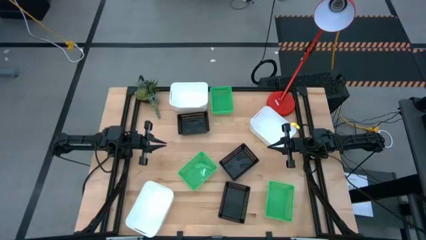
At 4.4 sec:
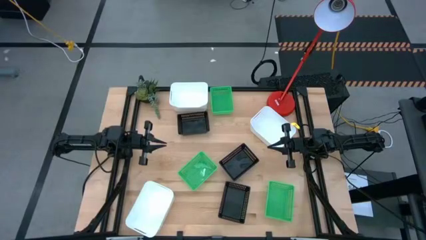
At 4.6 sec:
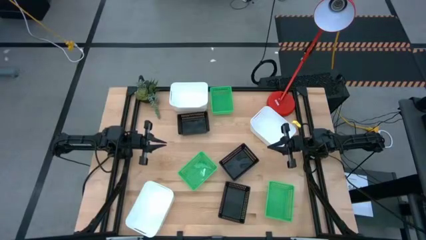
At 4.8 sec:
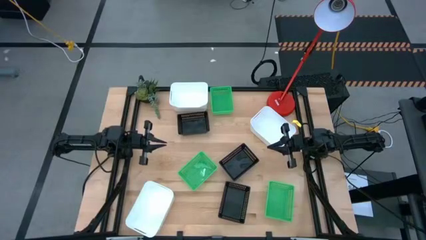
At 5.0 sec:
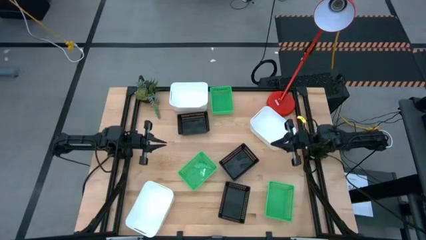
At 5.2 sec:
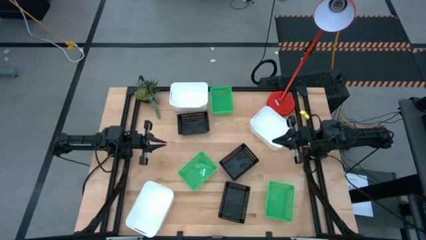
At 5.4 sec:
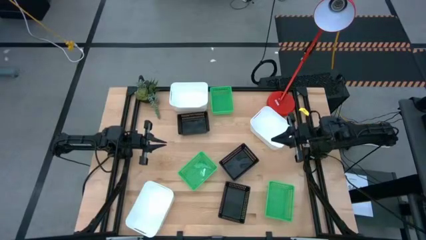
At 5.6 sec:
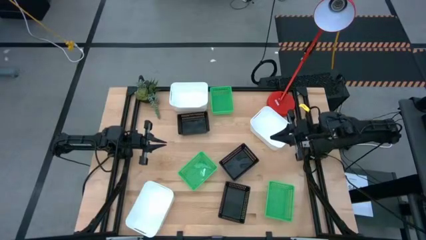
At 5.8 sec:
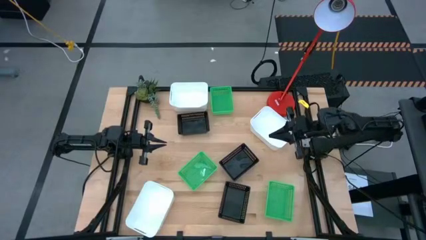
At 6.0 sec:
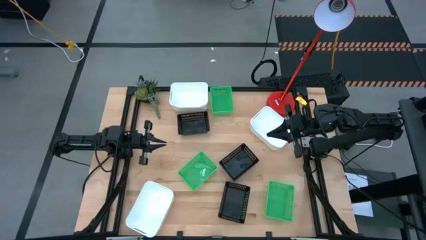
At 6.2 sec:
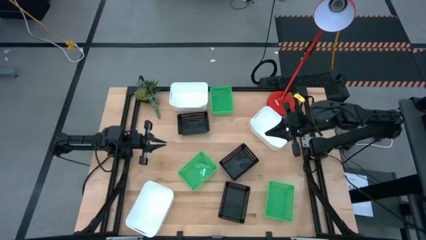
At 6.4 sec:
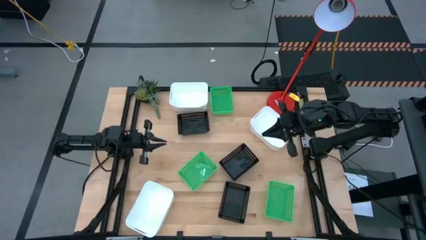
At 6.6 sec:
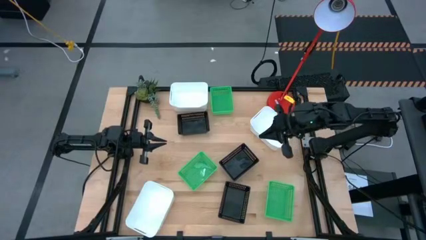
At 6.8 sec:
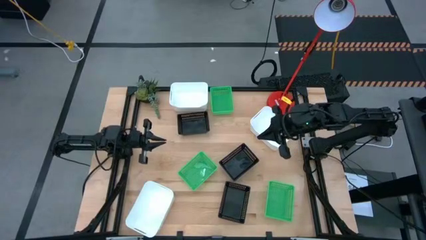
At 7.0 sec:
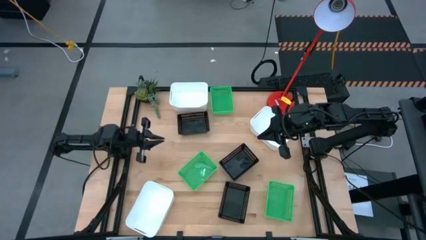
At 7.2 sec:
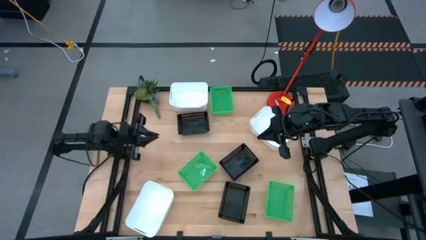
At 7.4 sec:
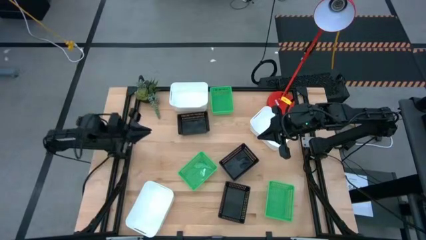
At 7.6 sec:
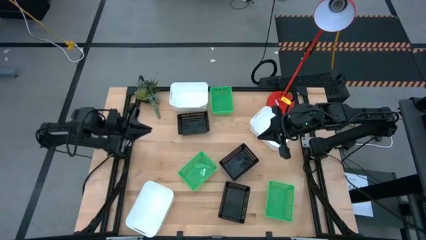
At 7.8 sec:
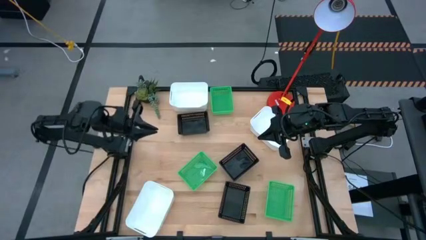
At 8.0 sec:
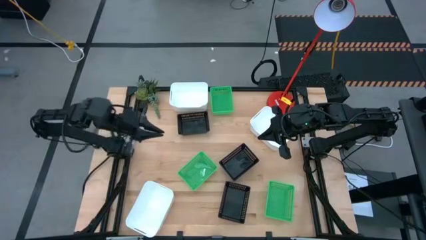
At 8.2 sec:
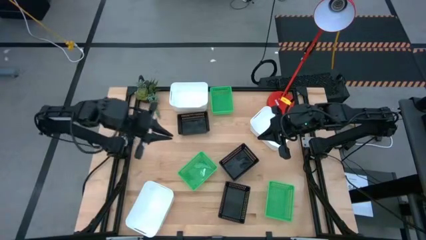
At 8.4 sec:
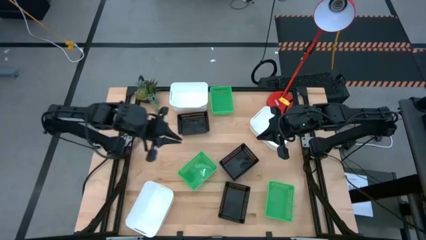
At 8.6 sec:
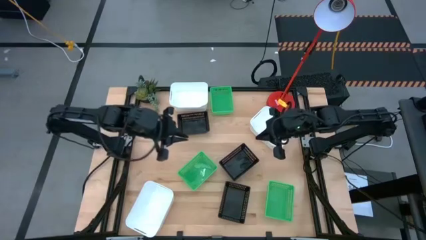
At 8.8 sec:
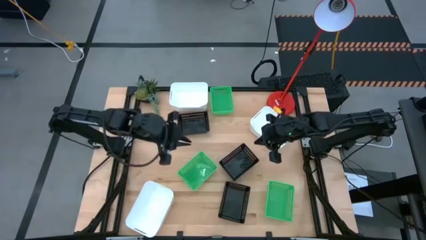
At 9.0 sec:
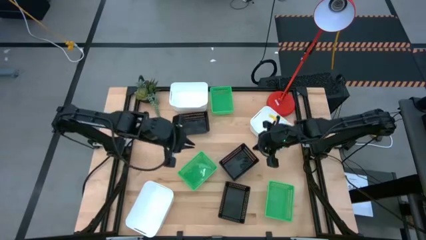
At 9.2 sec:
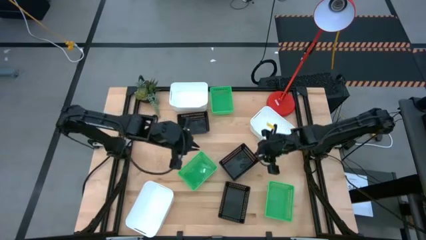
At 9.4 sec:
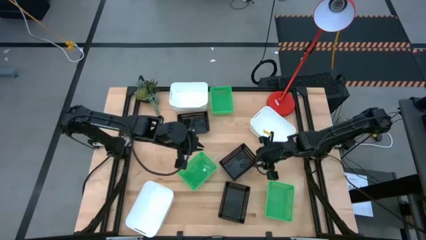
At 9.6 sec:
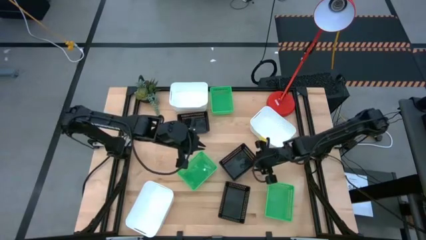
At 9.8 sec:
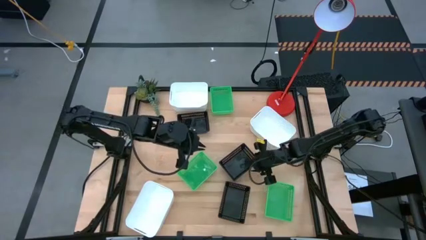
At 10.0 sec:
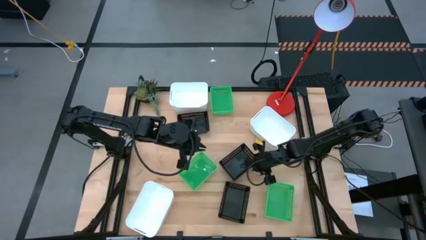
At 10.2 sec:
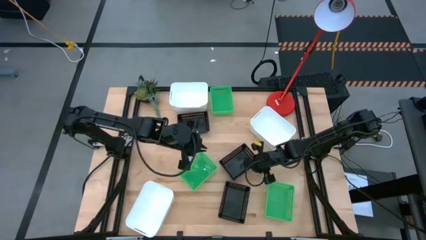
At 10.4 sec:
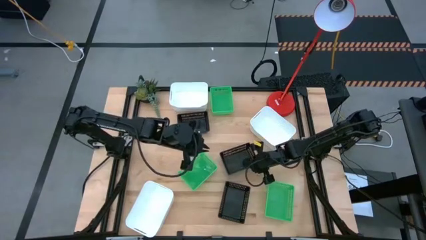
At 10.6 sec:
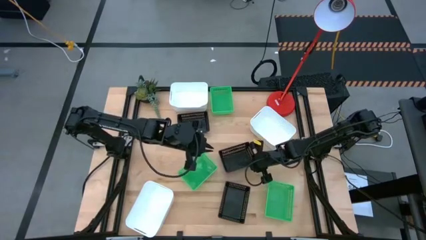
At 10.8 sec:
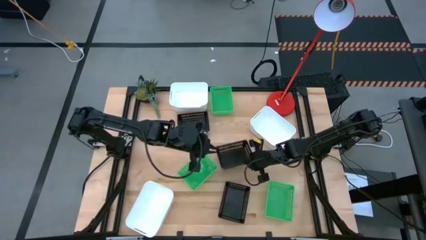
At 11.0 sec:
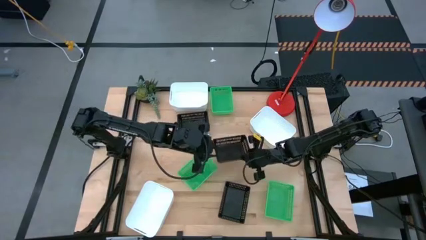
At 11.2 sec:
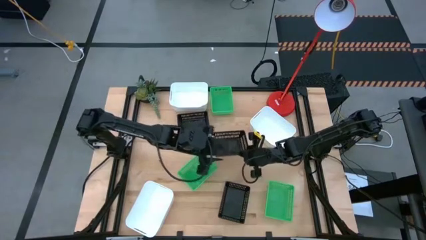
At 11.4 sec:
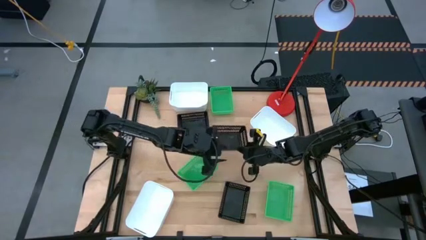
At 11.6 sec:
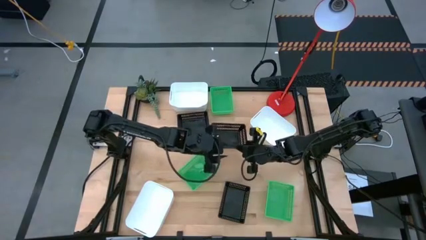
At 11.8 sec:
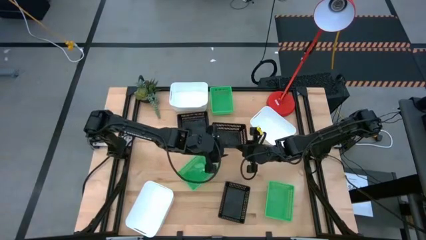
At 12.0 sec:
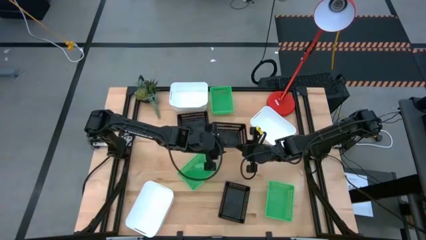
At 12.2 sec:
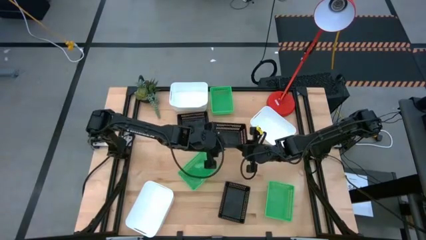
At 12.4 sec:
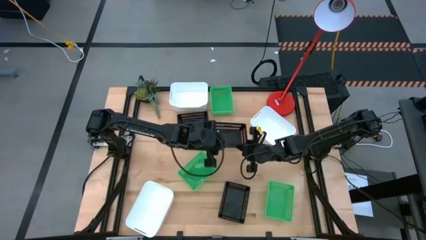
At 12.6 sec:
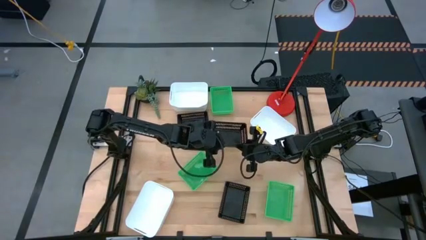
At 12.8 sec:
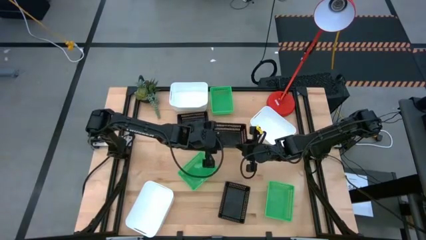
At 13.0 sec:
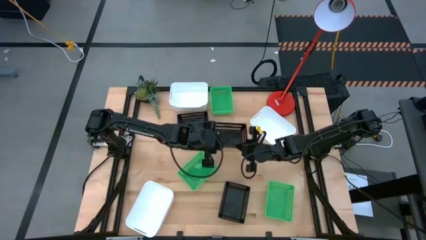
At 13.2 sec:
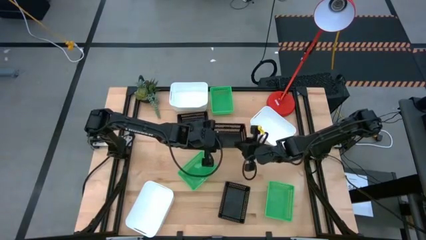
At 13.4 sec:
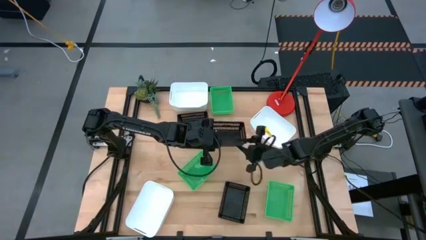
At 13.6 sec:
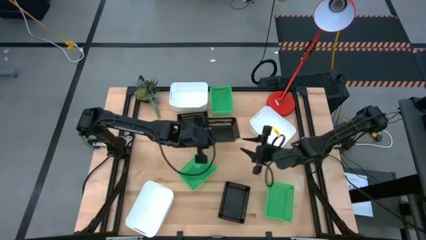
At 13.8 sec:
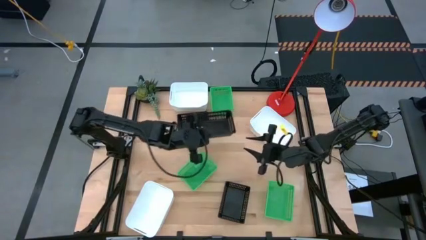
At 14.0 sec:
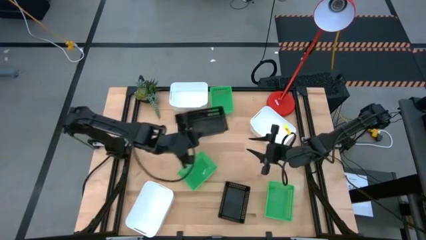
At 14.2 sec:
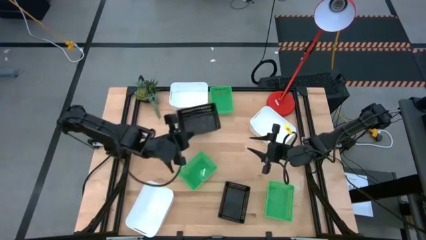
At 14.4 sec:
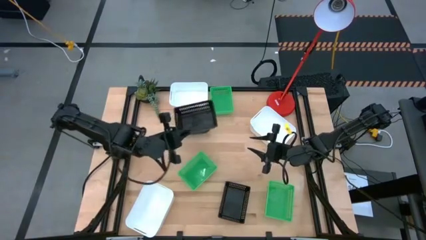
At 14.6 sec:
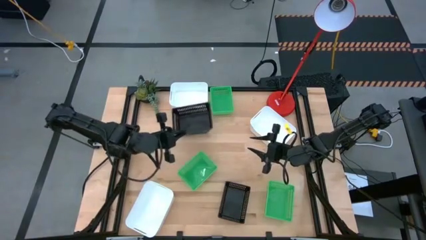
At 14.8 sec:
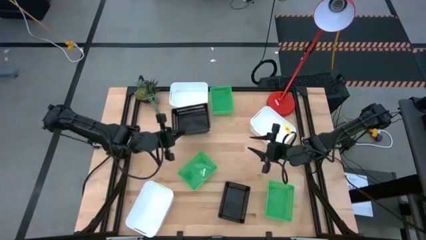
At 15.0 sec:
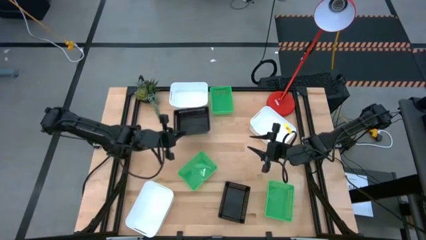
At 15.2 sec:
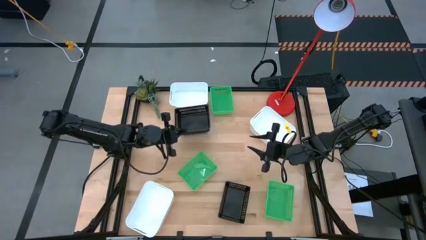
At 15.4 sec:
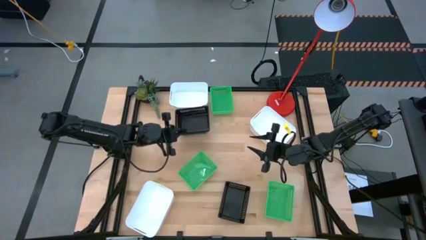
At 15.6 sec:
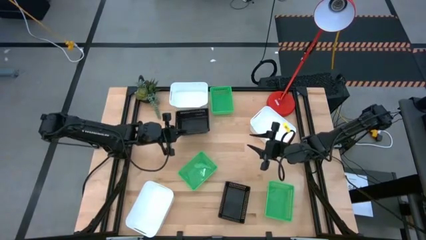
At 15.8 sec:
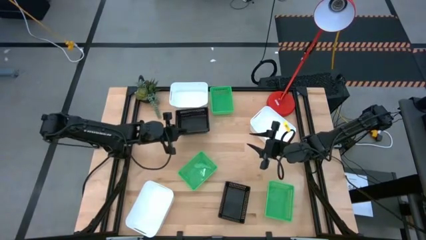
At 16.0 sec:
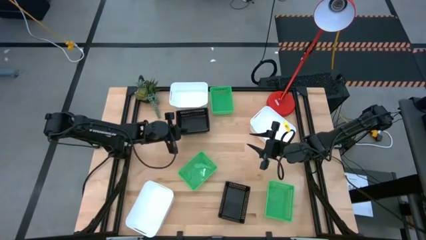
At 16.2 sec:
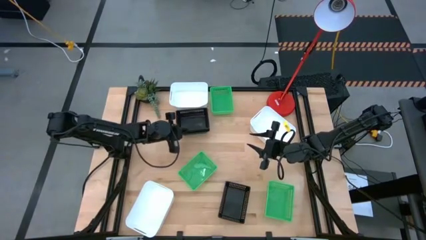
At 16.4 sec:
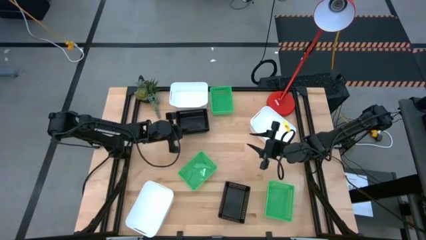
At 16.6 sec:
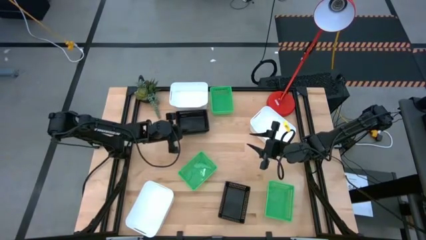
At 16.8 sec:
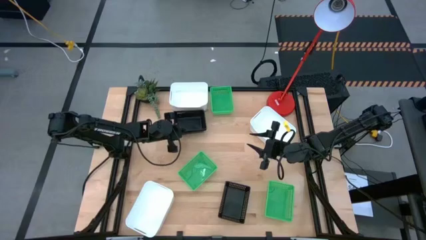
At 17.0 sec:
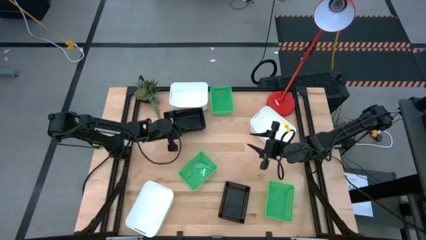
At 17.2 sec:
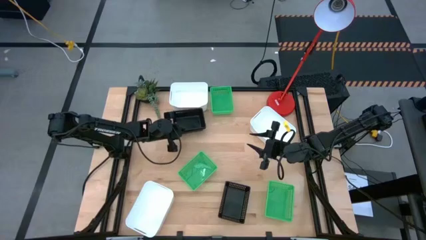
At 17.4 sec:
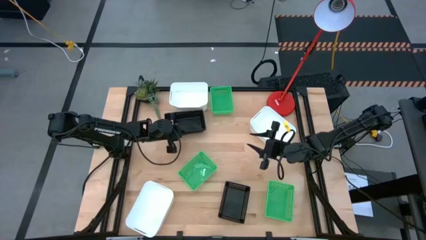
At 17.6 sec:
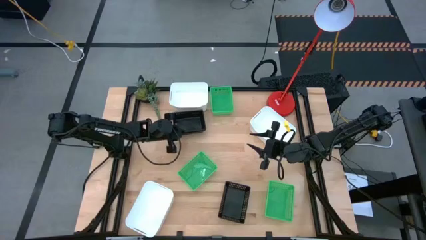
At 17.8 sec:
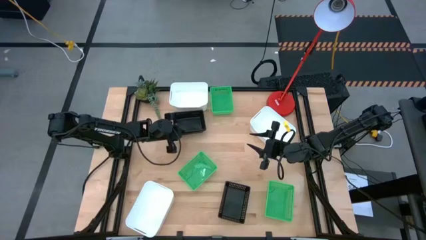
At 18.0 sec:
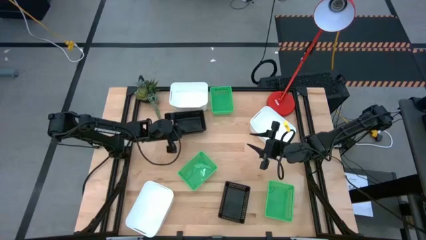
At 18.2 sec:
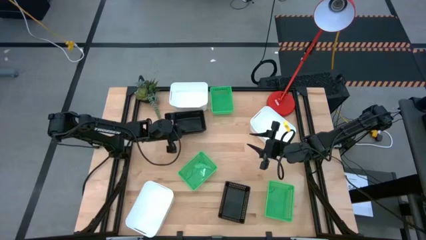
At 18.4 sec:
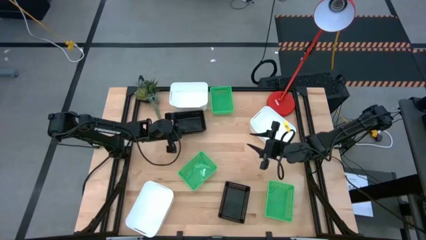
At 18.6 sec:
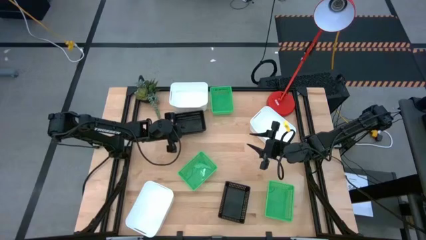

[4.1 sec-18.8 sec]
Stack the middle black bin on top of the top black bin
